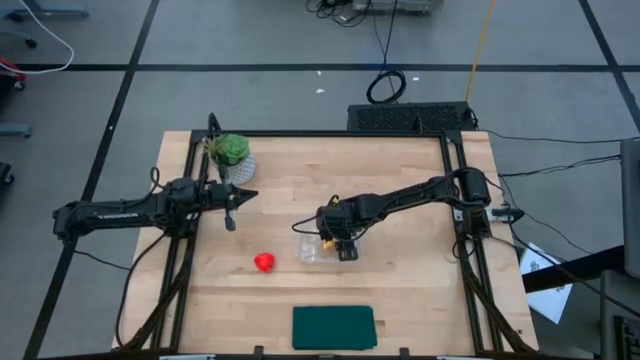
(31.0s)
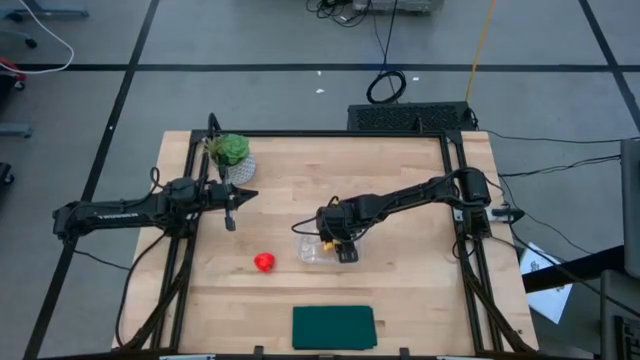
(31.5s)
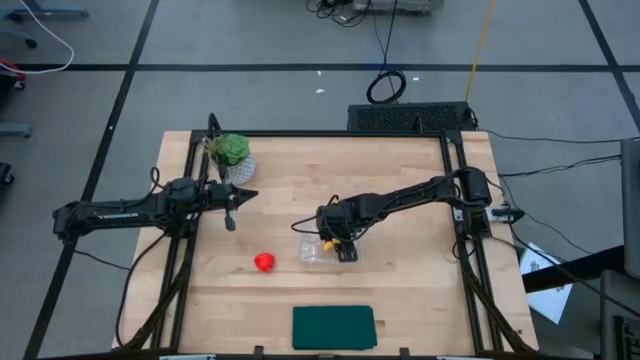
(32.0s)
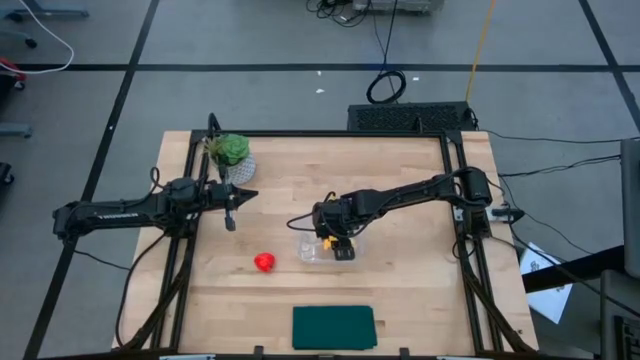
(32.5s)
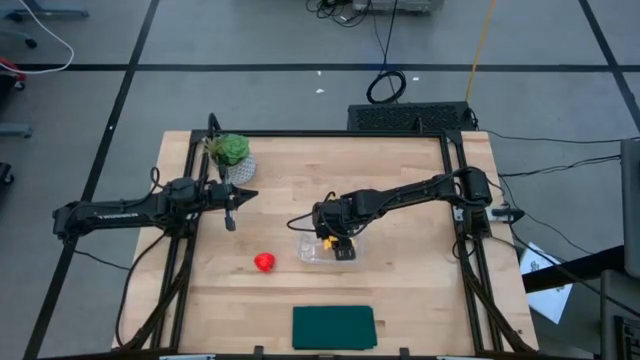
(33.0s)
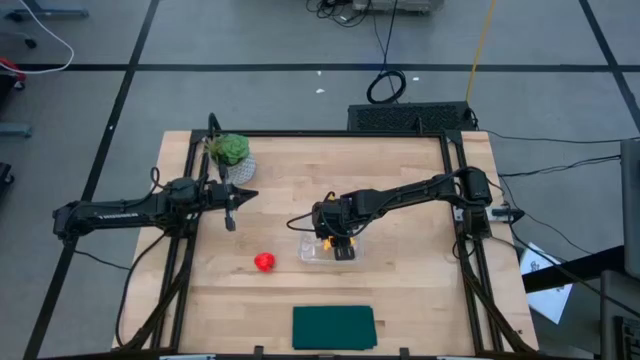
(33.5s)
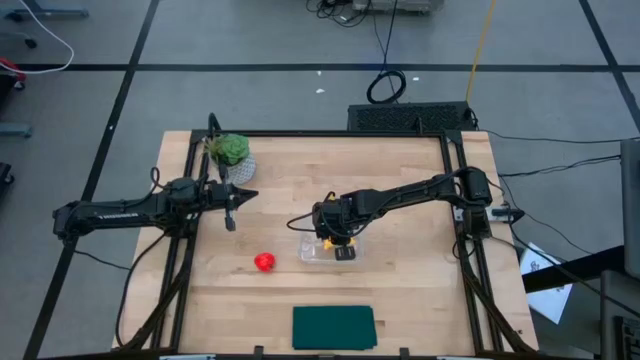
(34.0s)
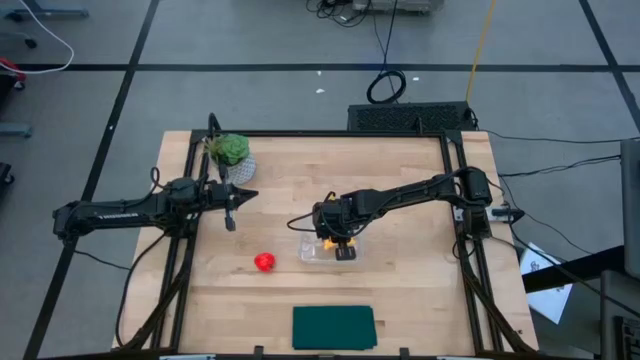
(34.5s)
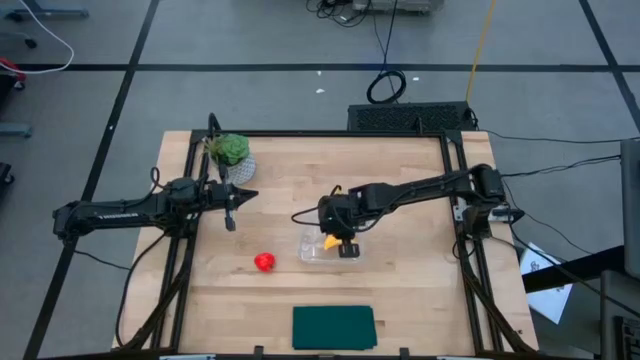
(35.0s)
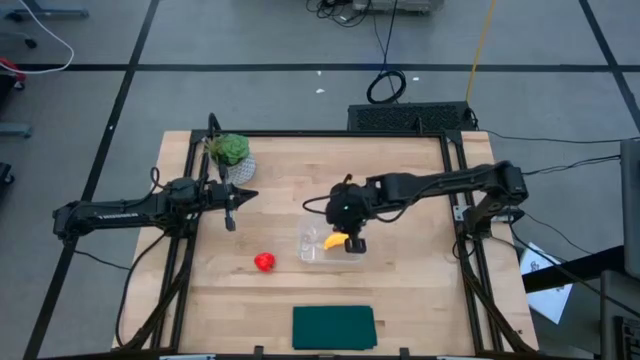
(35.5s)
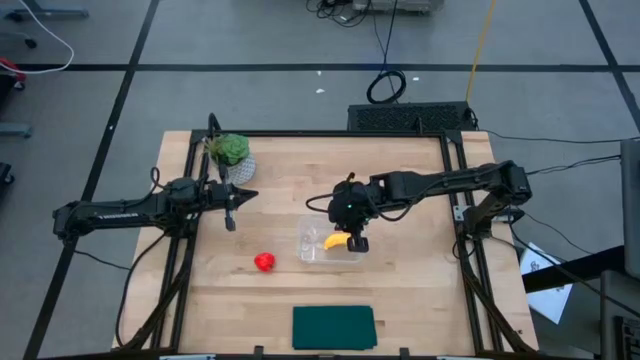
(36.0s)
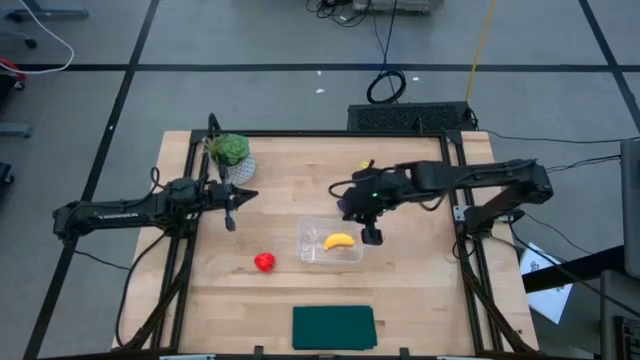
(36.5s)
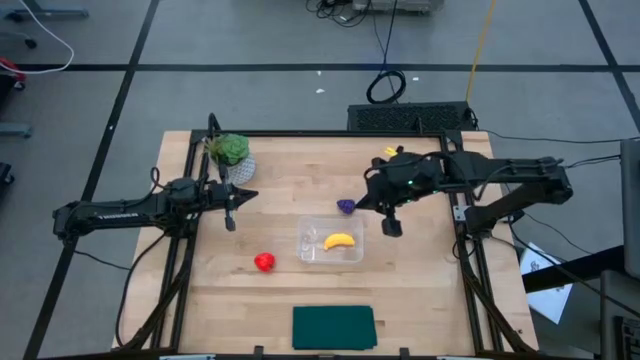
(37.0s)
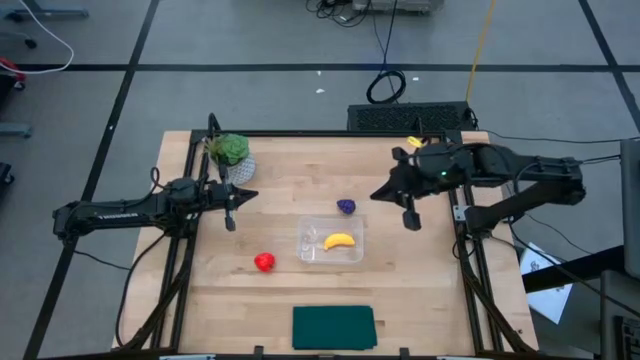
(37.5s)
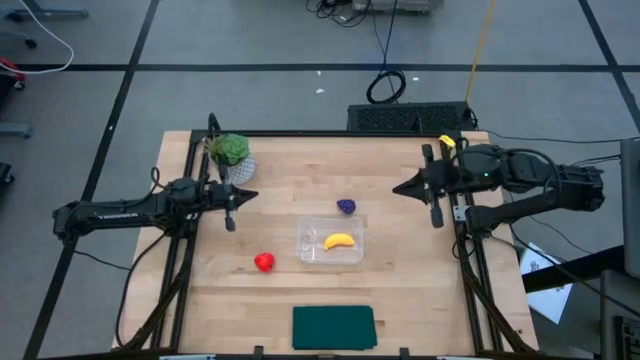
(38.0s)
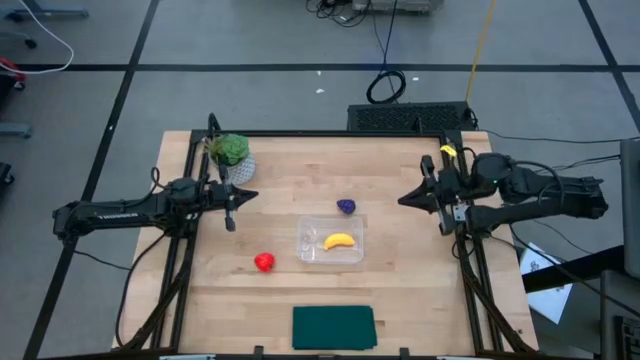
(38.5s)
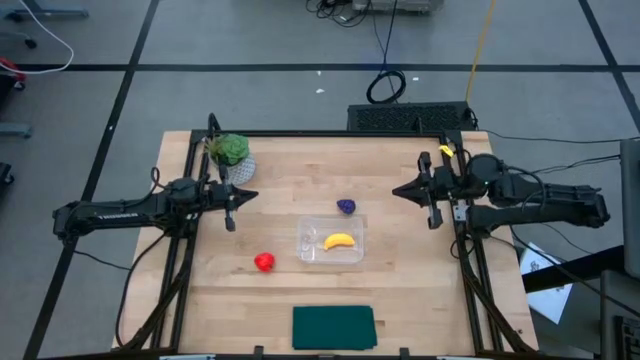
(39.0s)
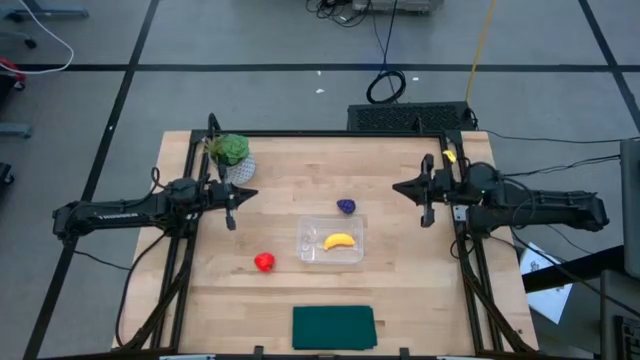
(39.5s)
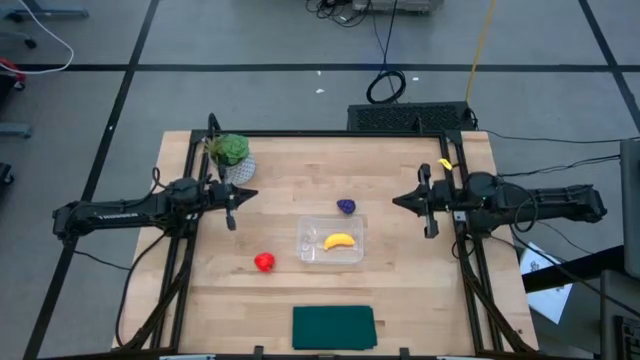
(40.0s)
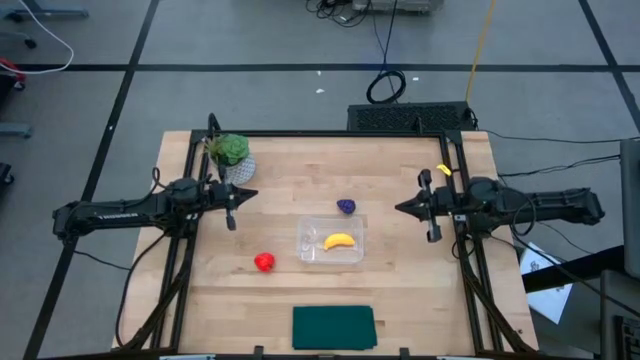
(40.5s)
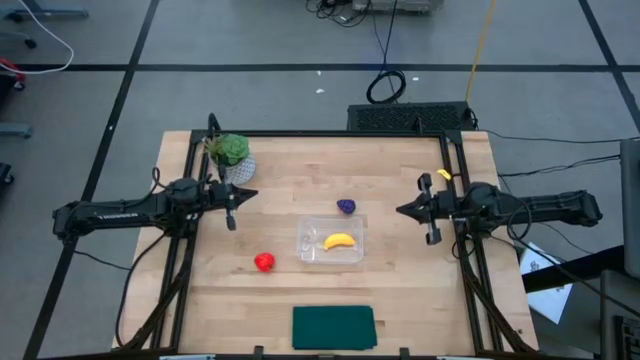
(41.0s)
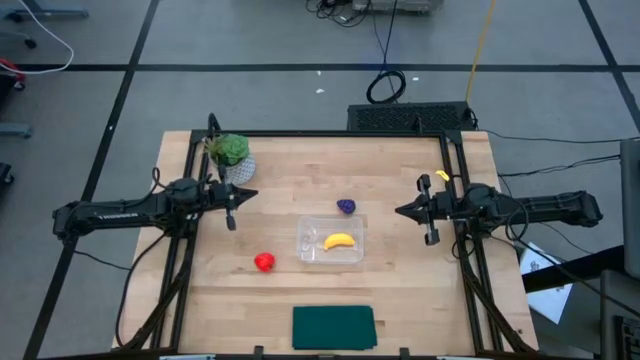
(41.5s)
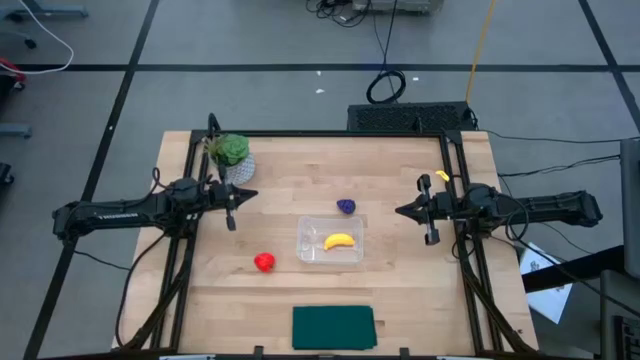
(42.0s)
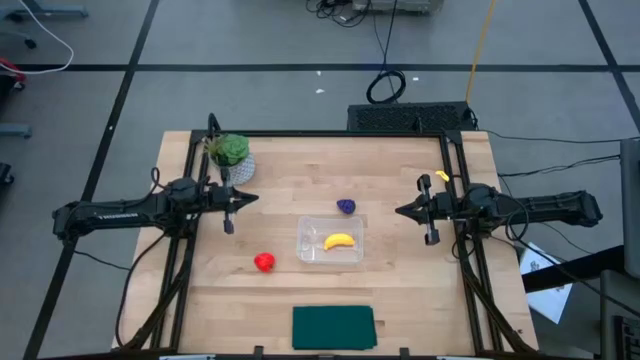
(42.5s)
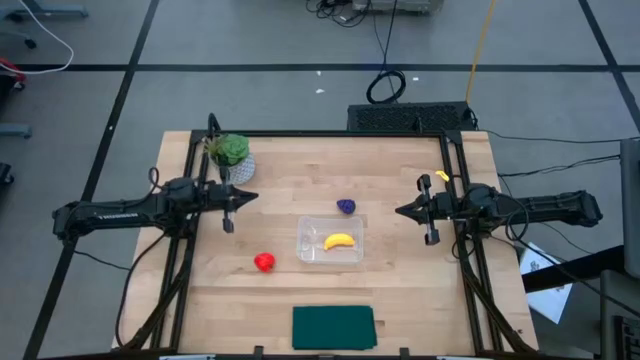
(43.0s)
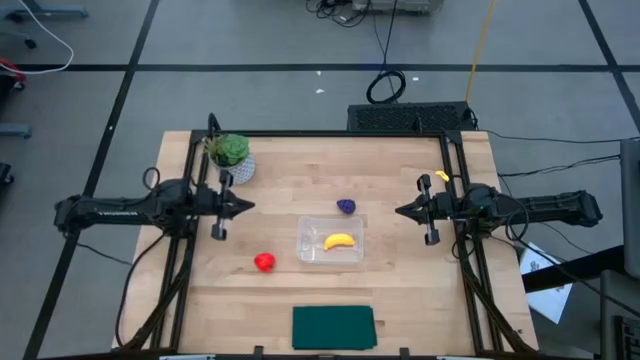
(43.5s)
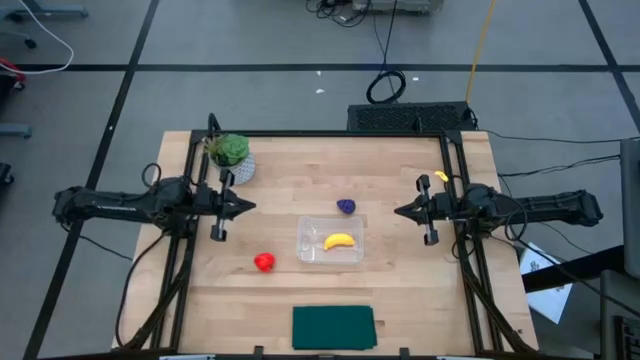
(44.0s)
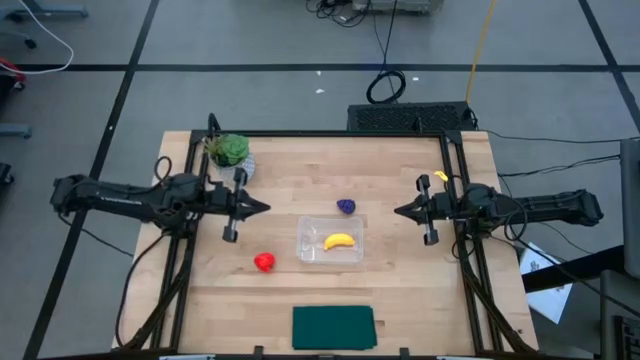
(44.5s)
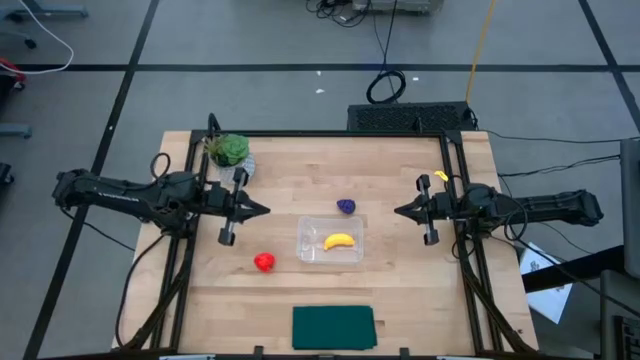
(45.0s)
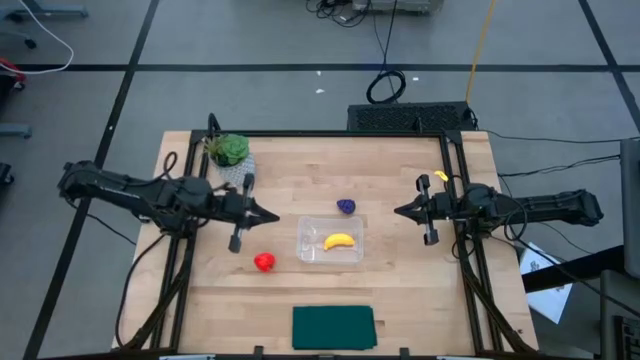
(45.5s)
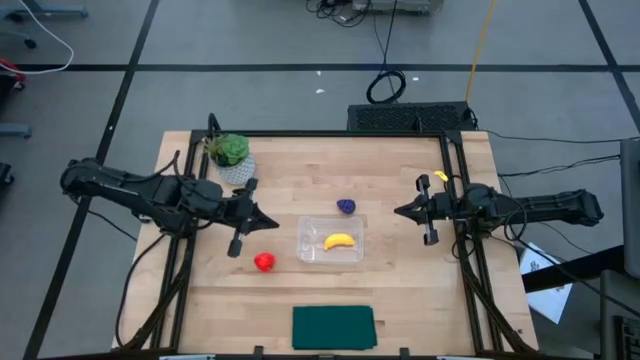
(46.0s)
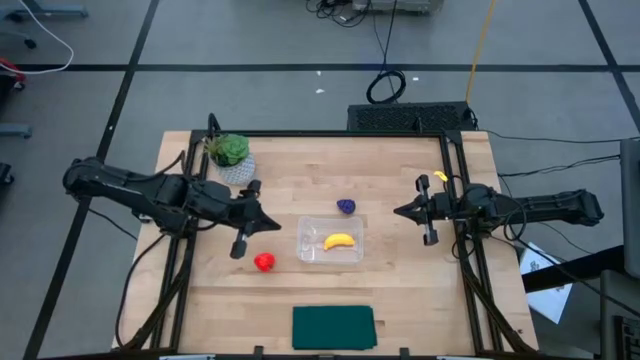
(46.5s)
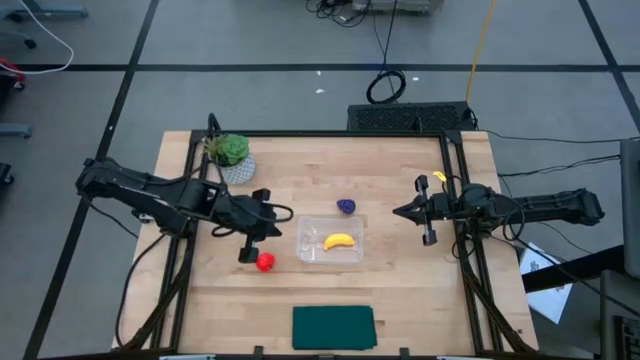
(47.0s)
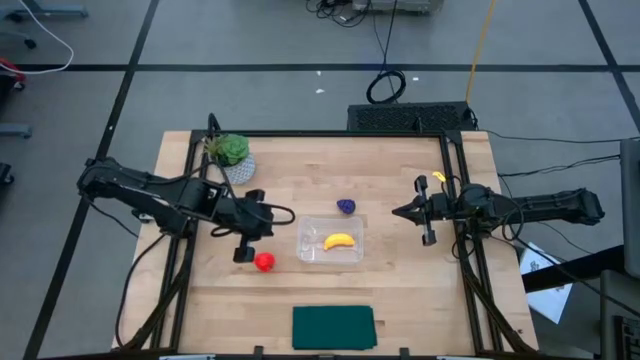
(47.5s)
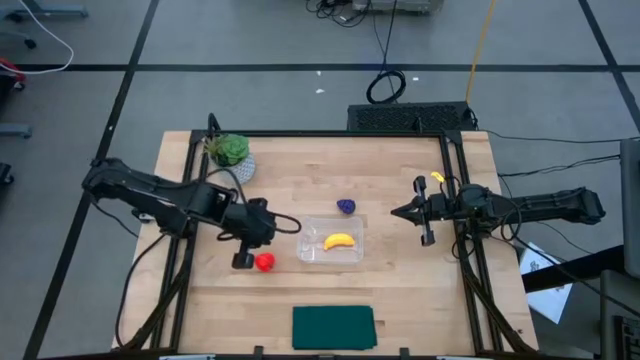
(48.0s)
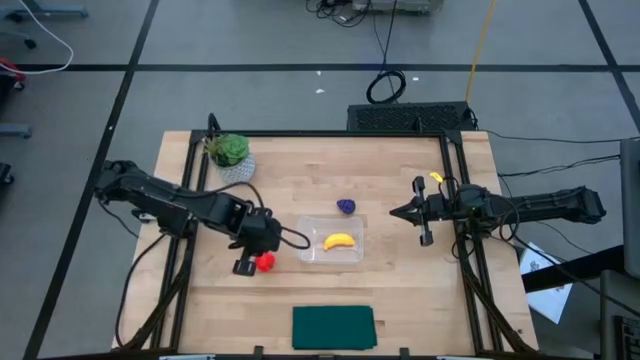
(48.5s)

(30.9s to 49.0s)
Task: Pick and placing Produce into tupperware
Put the apple into the transparent bin
